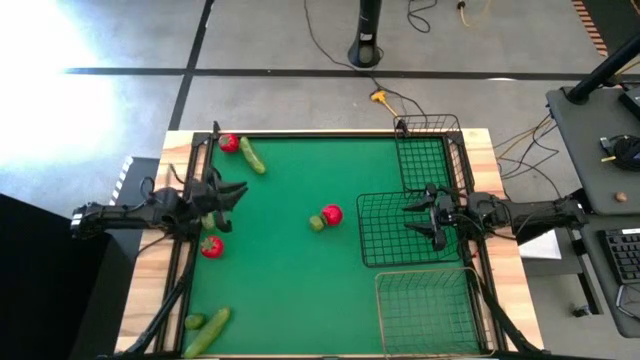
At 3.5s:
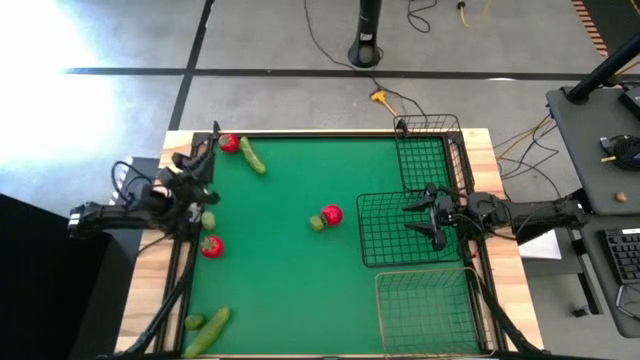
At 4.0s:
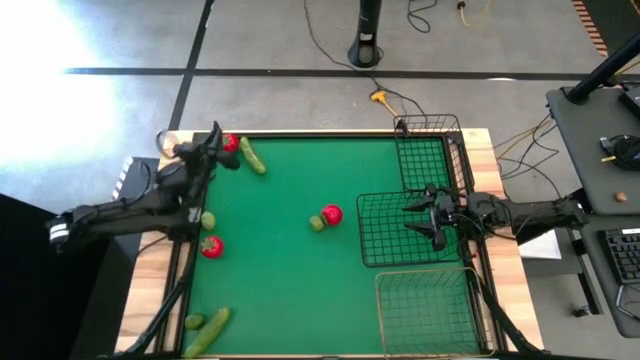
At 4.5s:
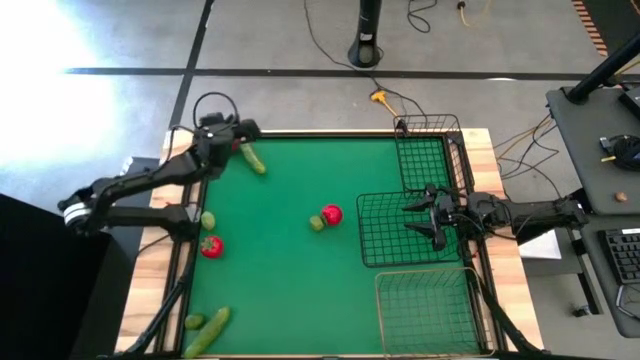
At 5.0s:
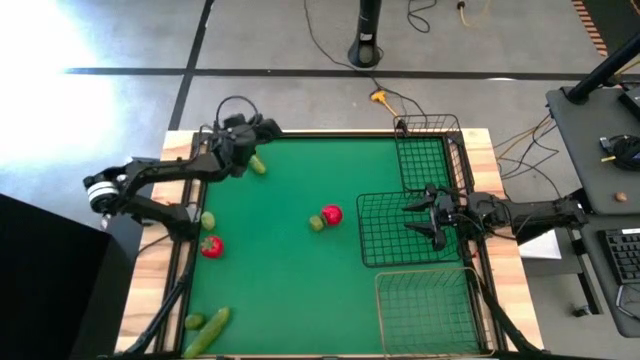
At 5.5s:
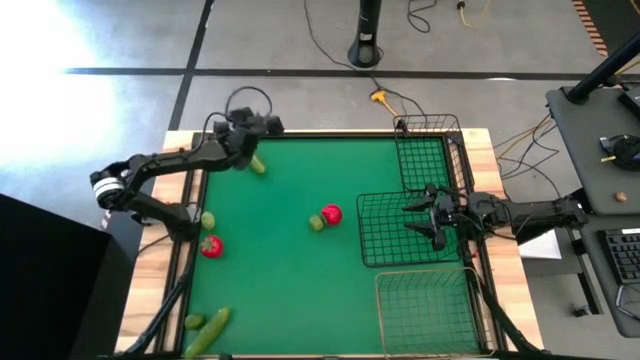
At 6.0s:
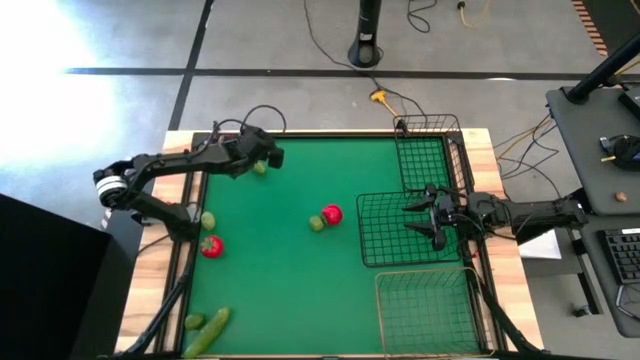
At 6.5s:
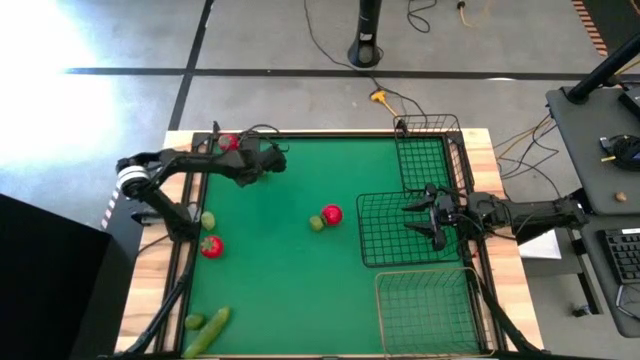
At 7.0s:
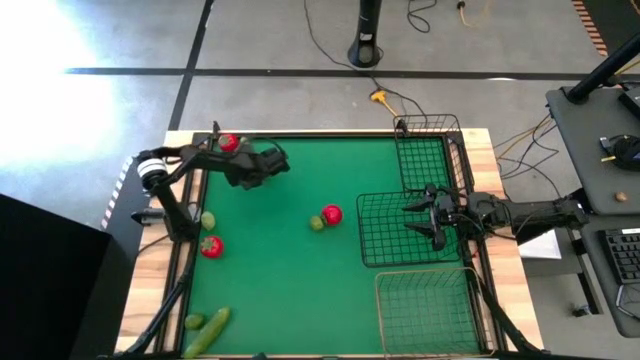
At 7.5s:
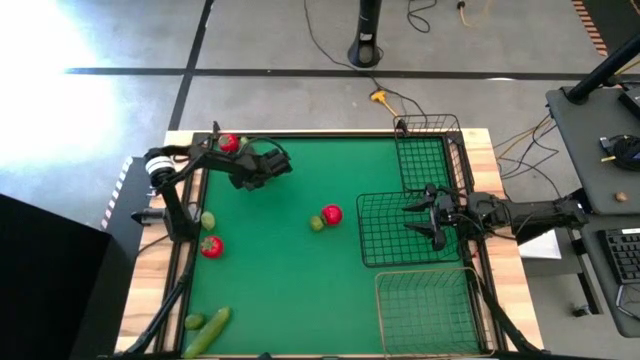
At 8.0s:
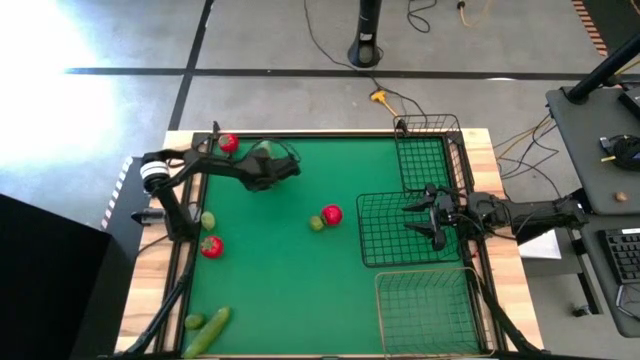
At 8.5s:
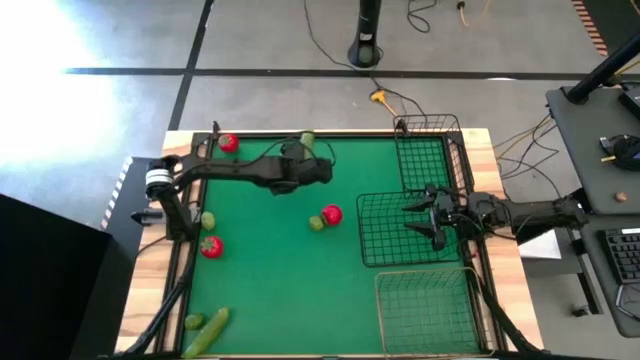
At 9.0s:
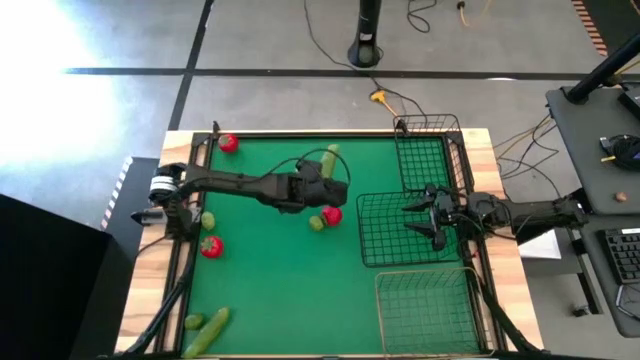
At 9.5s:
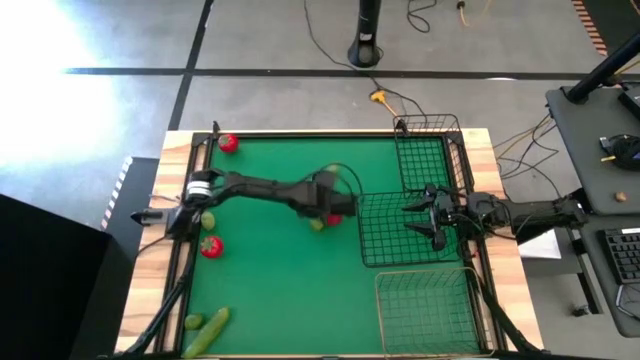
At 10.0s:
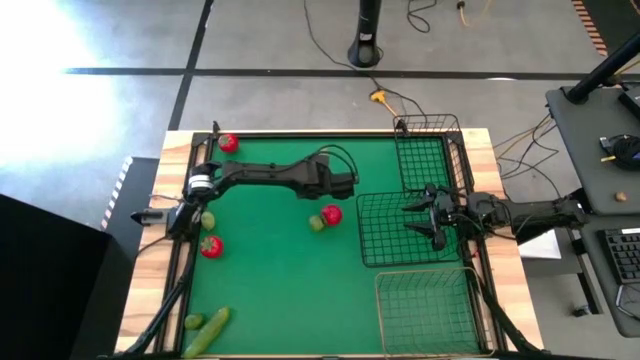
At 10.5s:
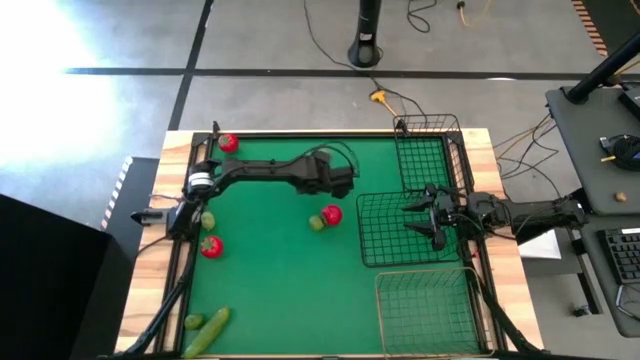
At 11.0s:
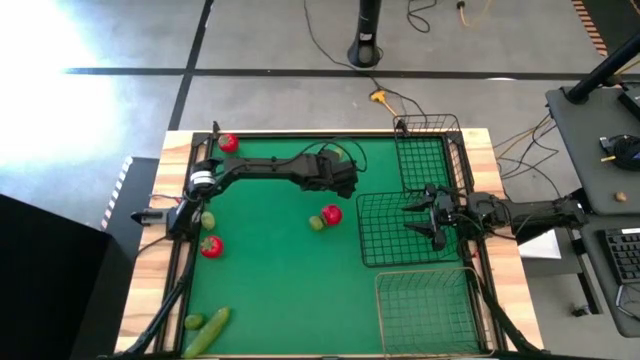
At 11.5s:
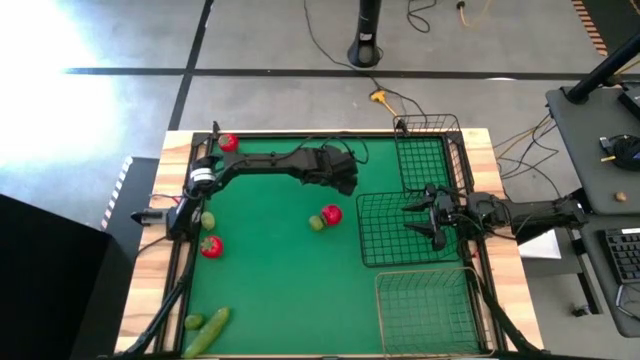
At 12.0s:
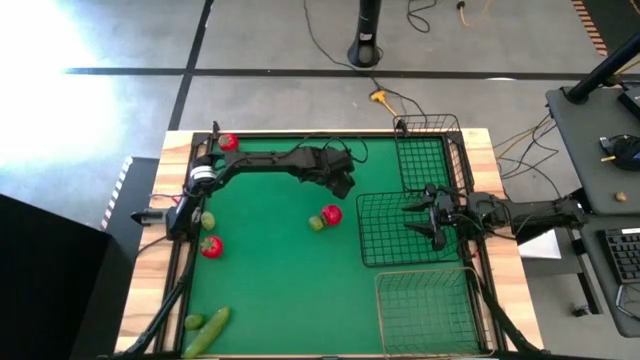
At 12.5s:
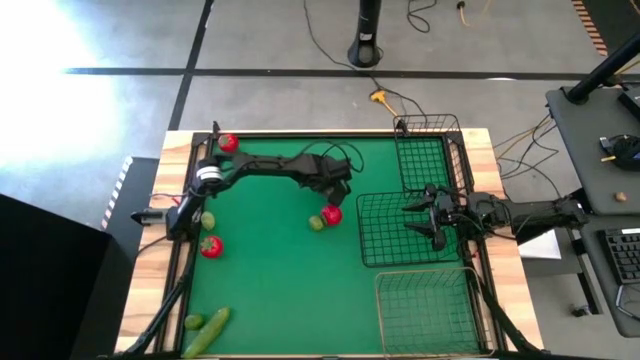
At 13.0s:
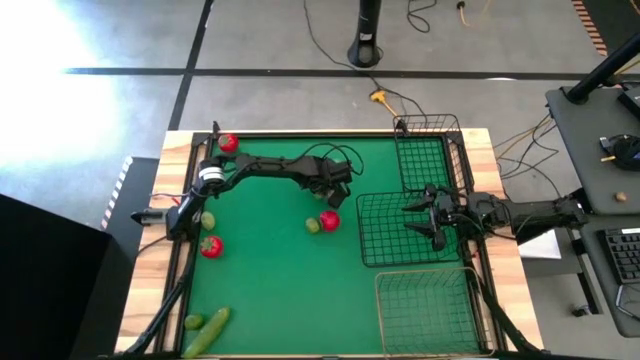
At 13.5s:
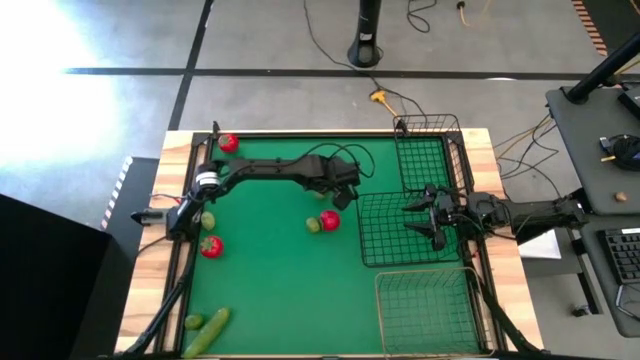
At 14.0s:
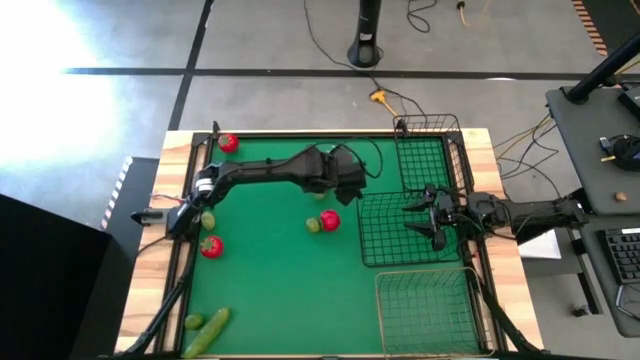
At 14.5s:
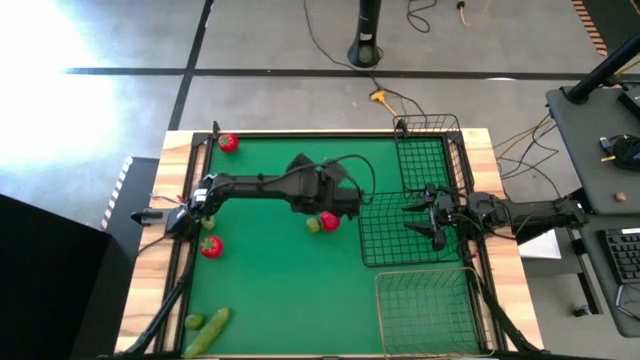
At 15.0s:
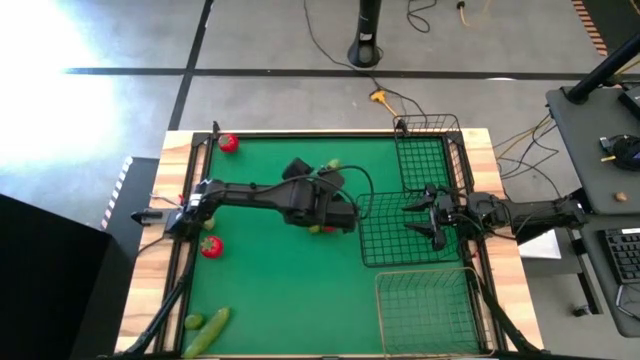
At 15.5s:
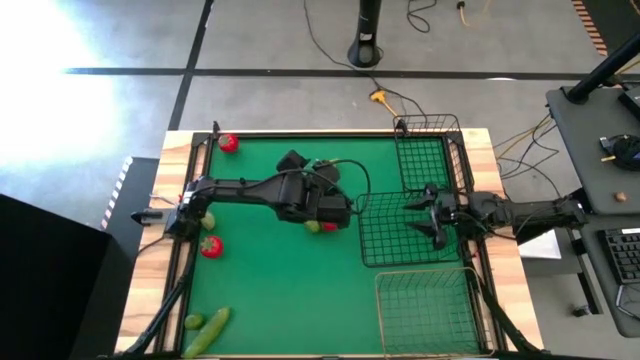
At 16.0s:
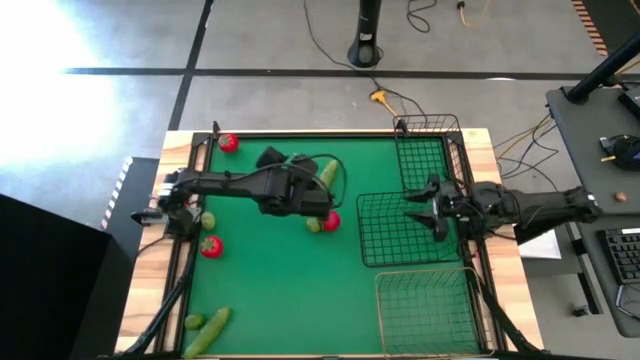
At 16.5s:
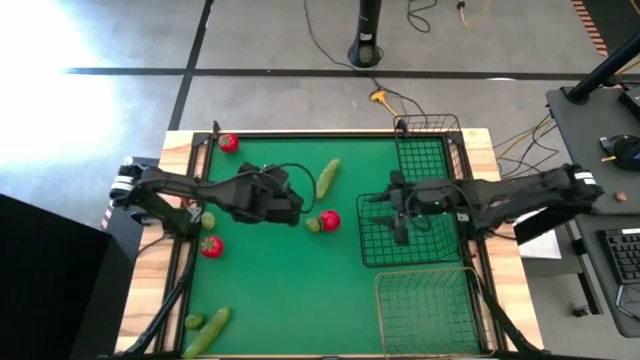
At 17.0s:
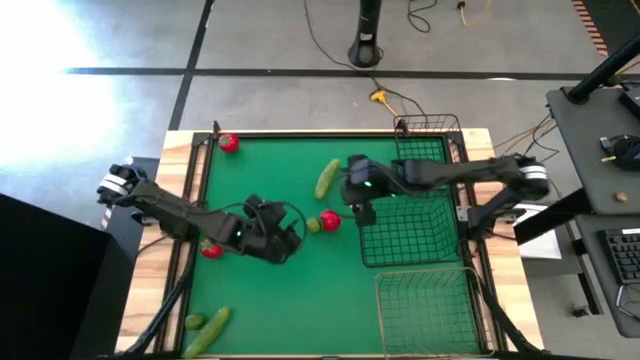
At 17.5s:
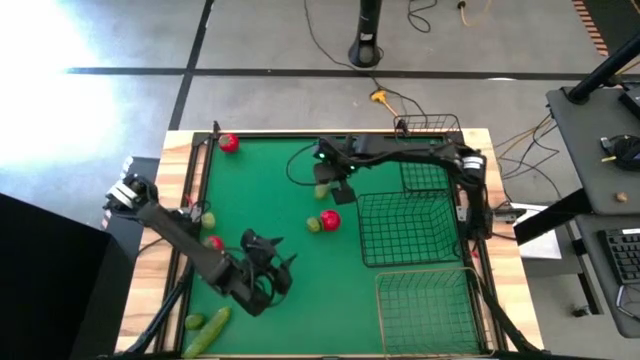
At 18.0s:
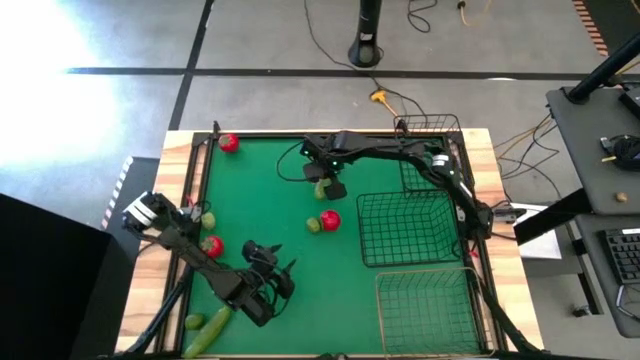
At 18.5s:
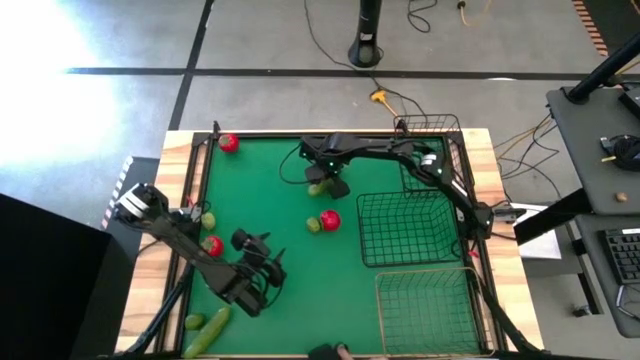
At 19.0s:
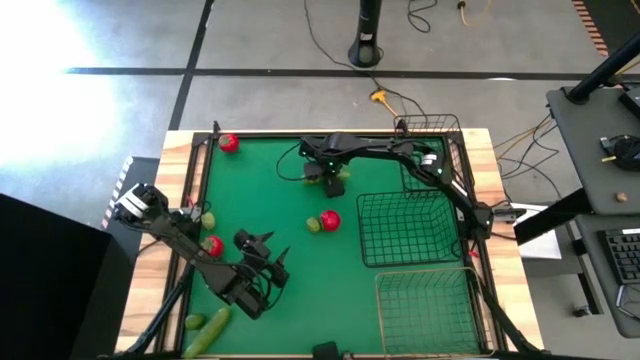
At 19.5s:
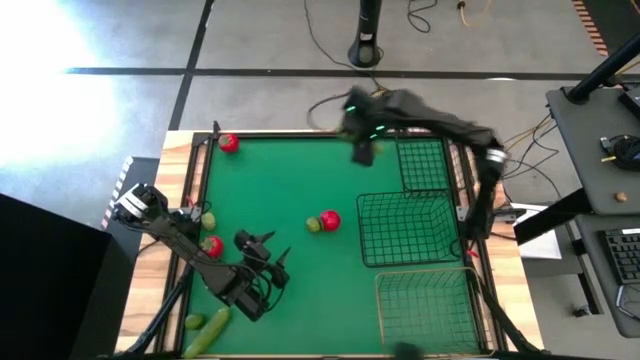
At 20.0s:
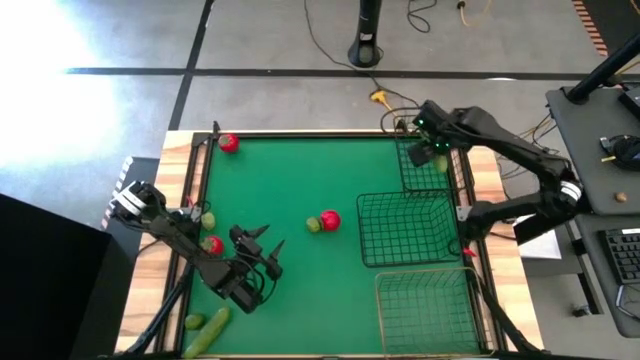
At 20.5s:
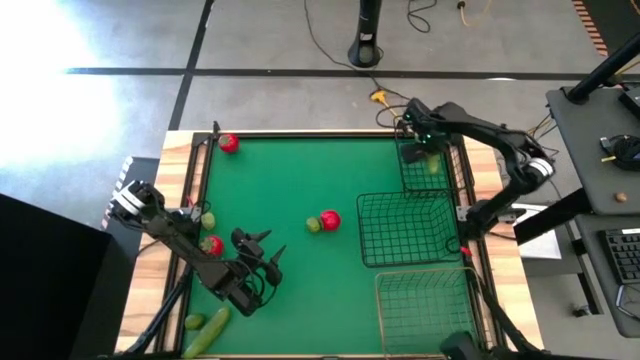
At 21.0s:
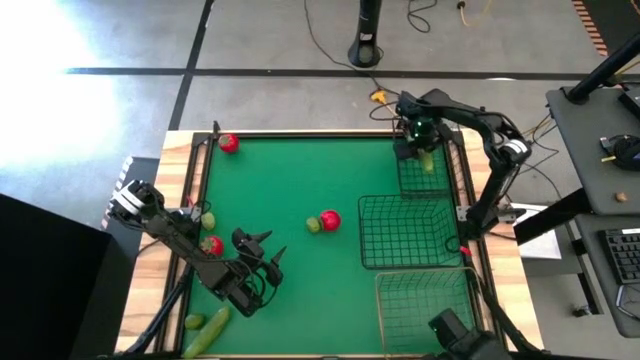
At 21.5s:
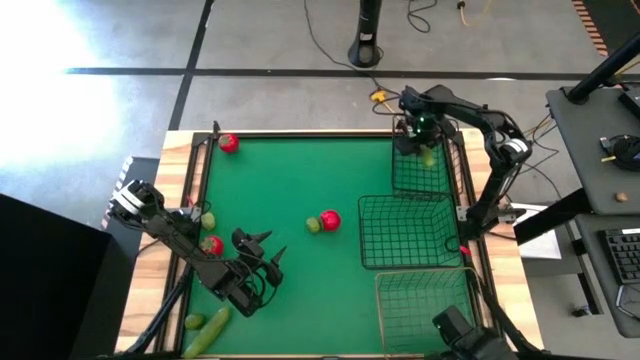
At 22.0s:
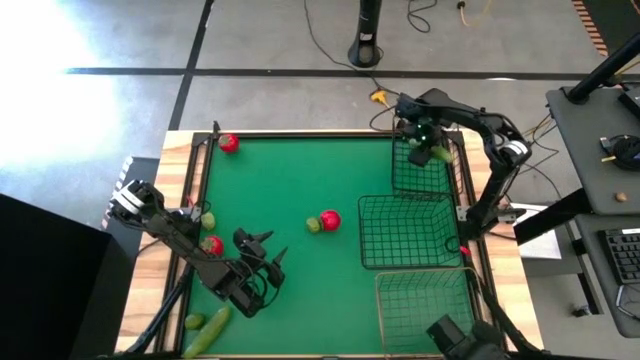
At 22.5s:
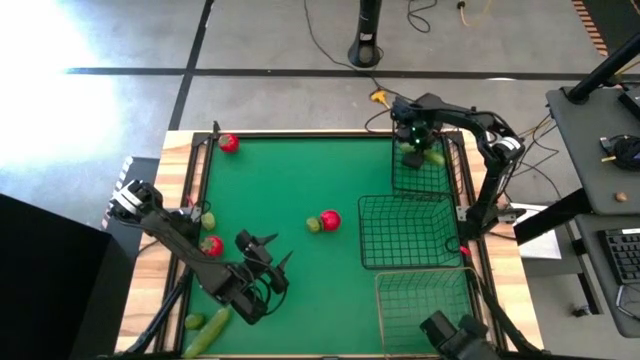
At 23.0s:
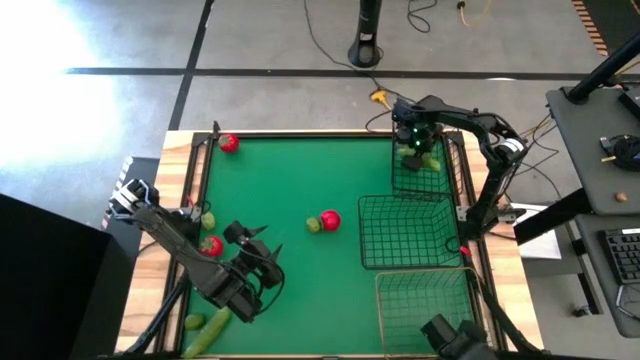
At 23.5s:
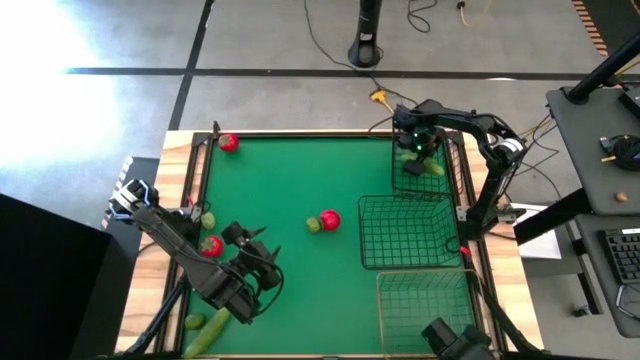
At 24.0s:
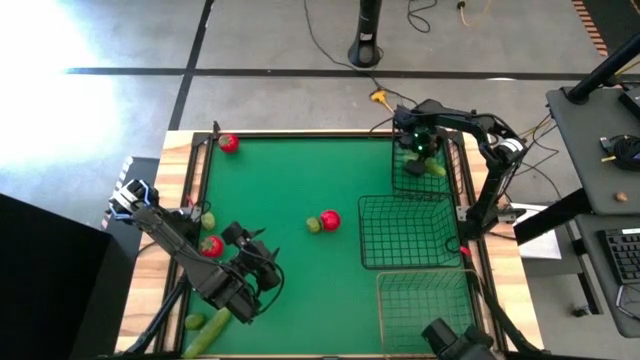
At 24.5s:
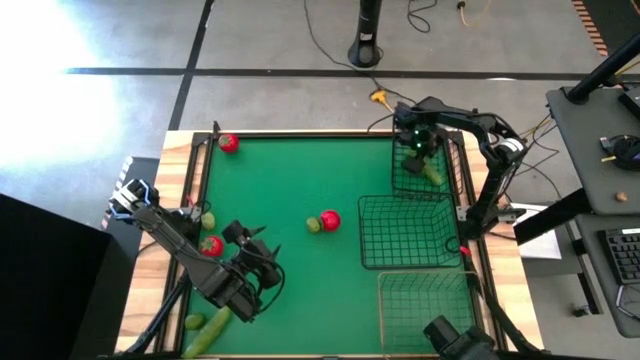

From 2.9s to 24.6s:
Task: Sort produce into baskets
Put the top cucumber into the top black wire basket
